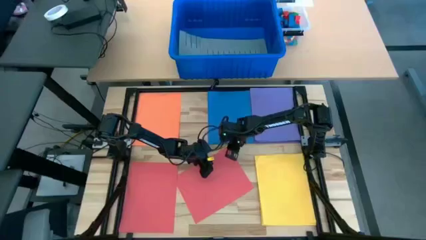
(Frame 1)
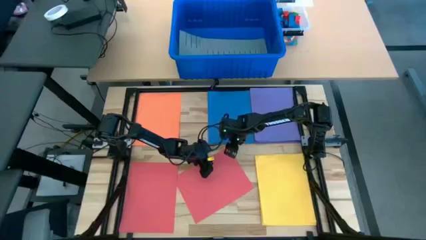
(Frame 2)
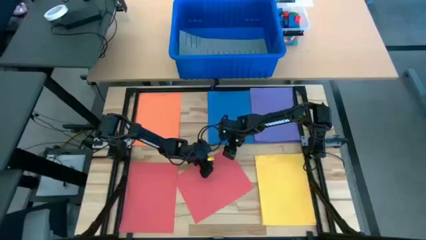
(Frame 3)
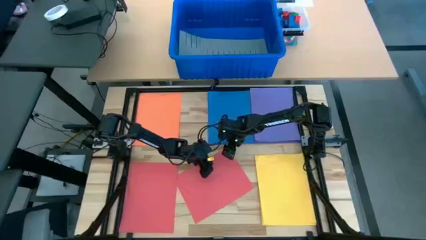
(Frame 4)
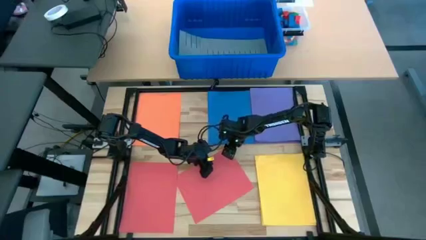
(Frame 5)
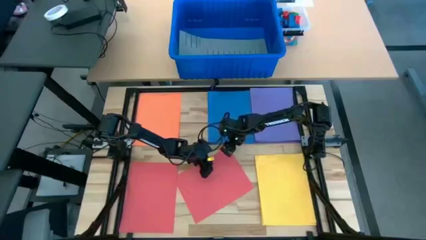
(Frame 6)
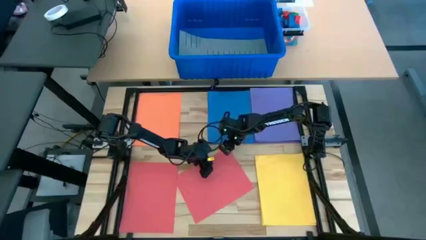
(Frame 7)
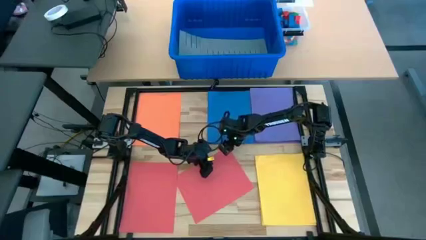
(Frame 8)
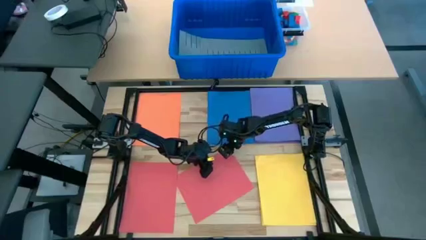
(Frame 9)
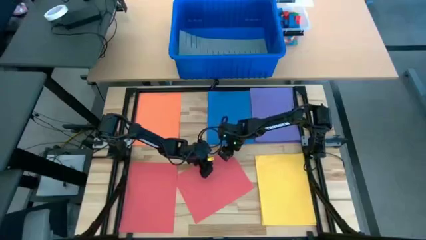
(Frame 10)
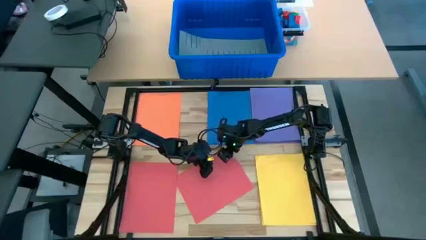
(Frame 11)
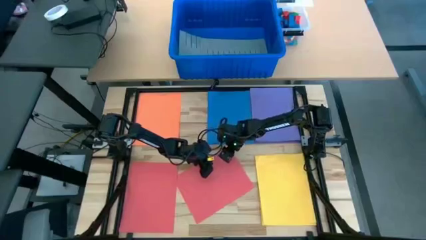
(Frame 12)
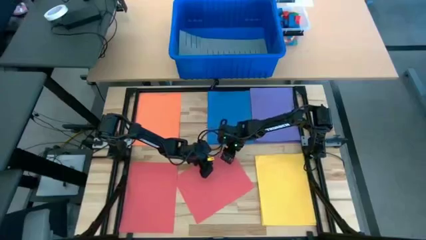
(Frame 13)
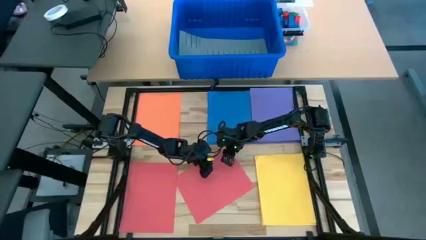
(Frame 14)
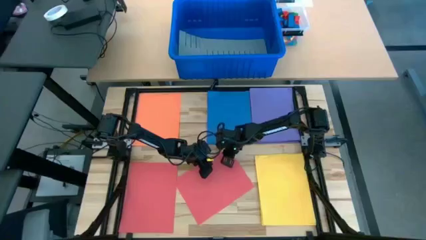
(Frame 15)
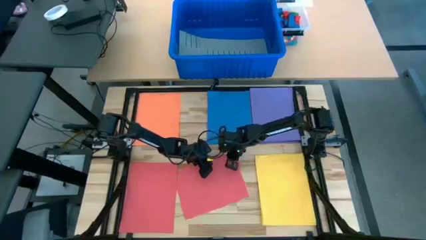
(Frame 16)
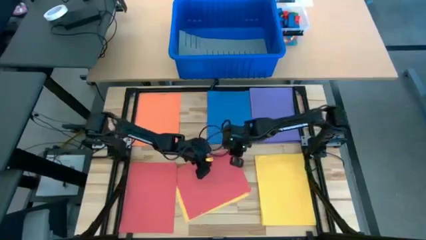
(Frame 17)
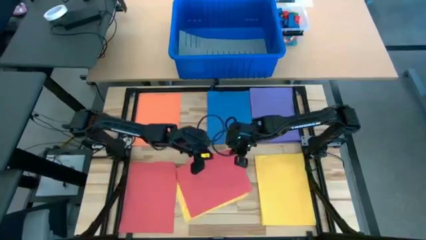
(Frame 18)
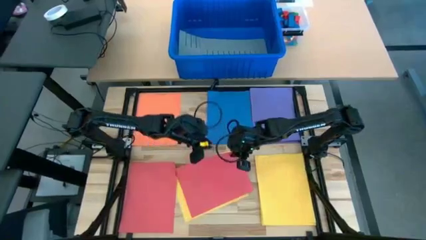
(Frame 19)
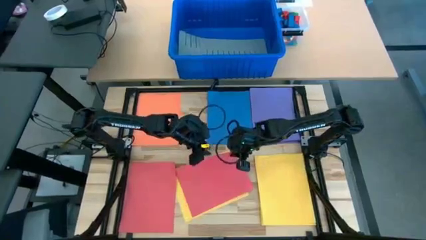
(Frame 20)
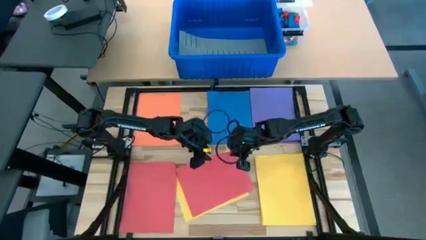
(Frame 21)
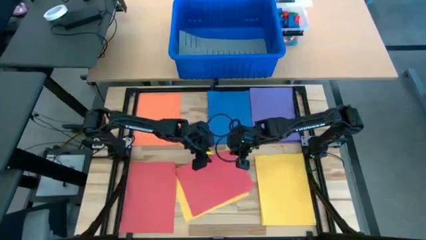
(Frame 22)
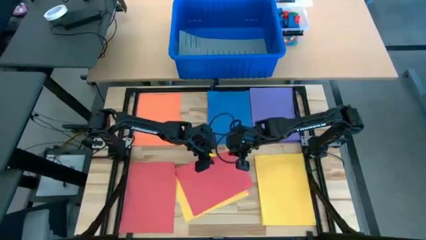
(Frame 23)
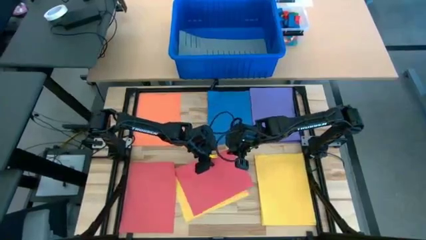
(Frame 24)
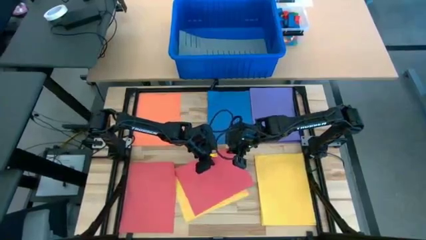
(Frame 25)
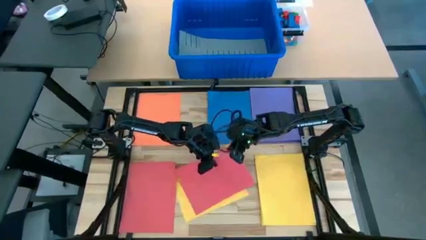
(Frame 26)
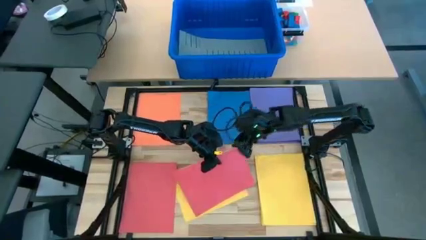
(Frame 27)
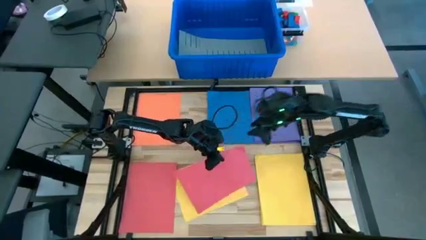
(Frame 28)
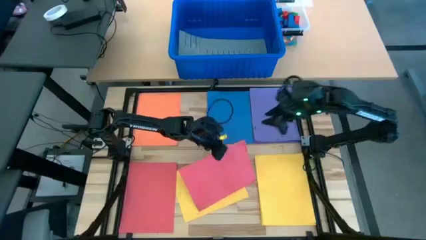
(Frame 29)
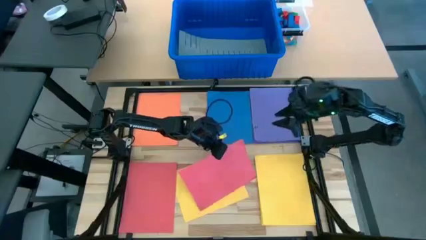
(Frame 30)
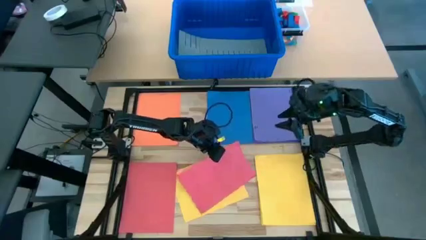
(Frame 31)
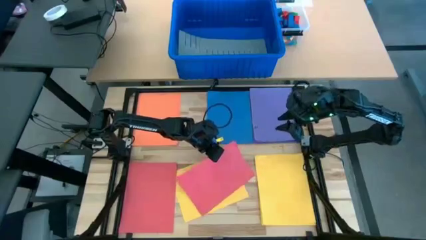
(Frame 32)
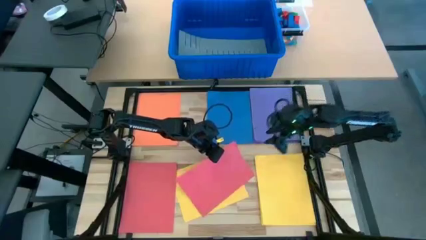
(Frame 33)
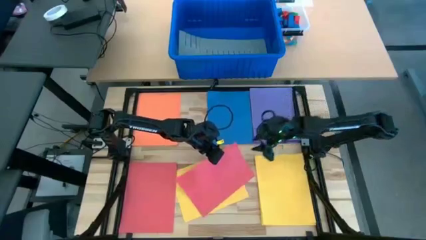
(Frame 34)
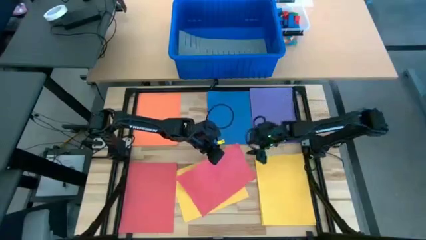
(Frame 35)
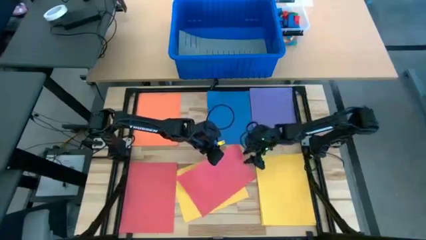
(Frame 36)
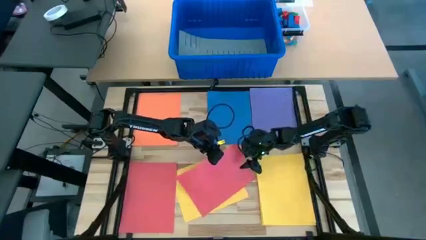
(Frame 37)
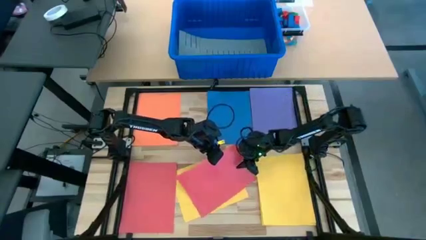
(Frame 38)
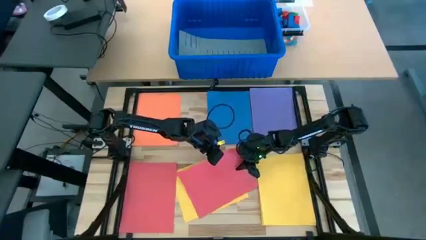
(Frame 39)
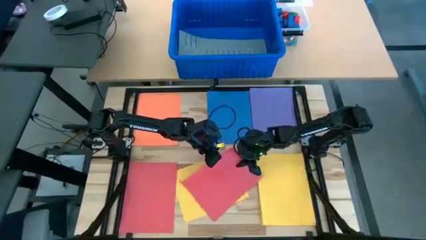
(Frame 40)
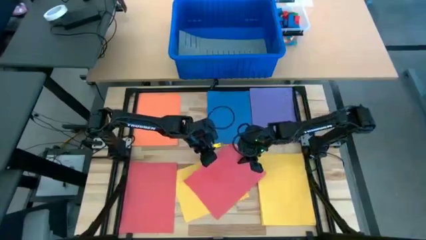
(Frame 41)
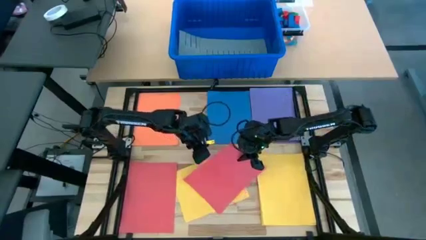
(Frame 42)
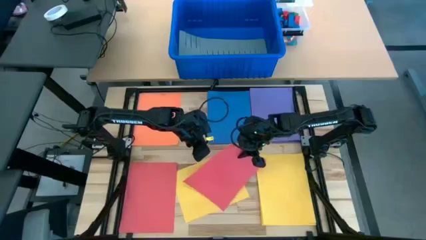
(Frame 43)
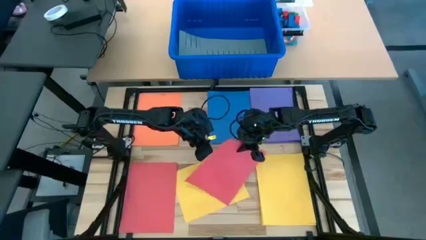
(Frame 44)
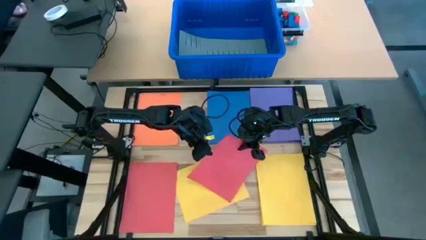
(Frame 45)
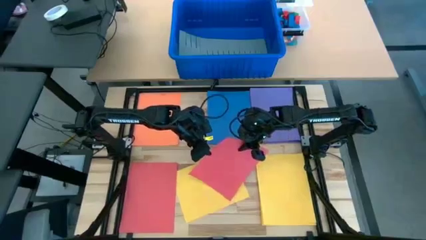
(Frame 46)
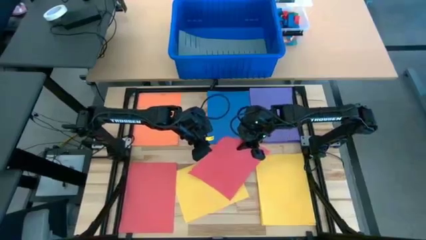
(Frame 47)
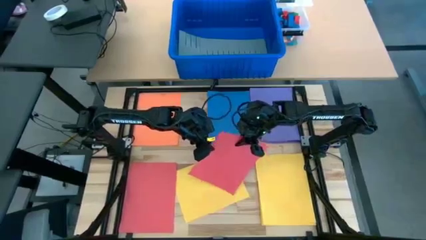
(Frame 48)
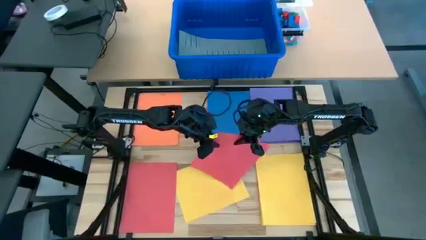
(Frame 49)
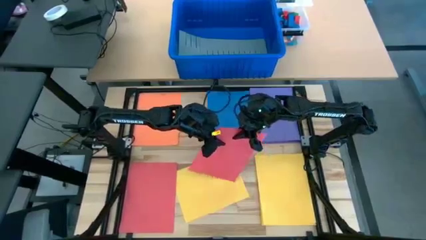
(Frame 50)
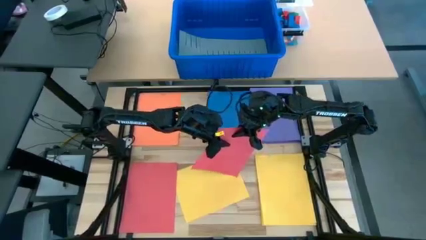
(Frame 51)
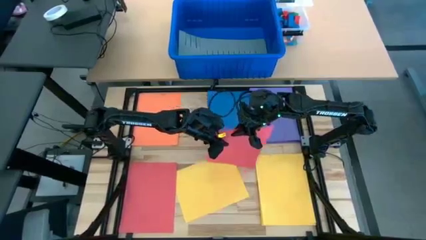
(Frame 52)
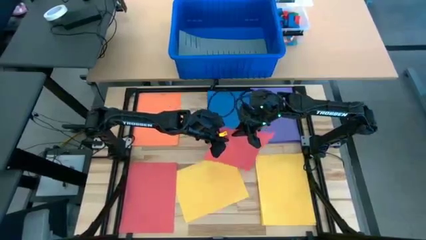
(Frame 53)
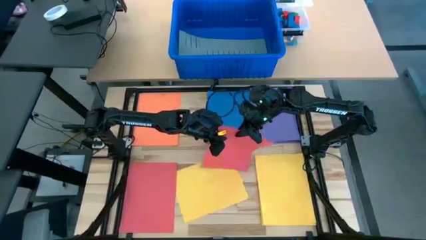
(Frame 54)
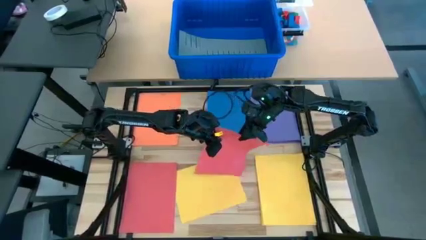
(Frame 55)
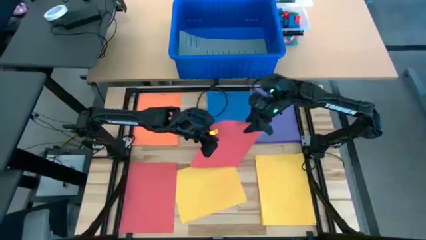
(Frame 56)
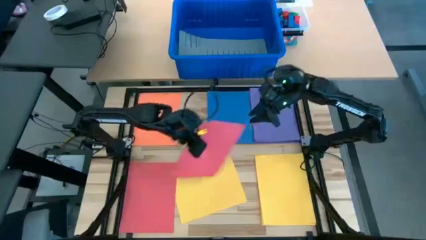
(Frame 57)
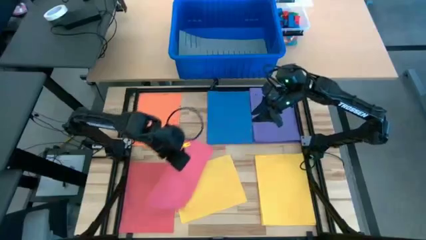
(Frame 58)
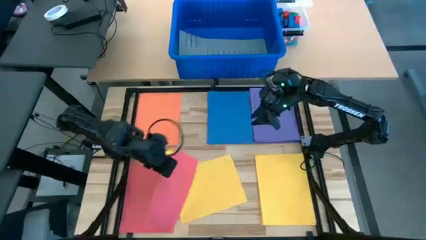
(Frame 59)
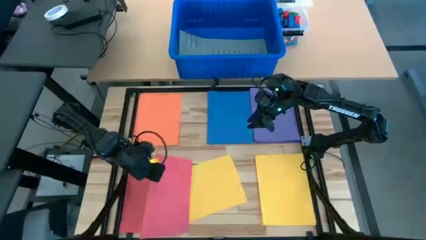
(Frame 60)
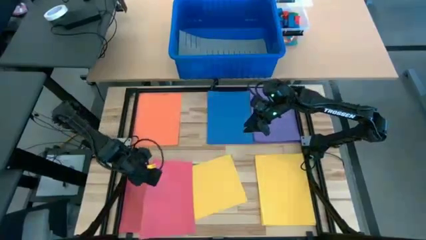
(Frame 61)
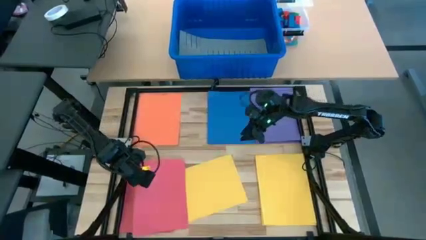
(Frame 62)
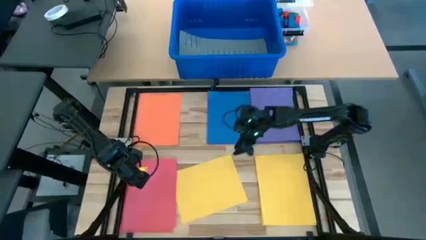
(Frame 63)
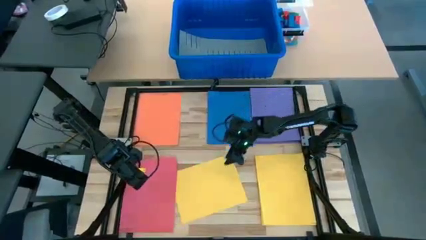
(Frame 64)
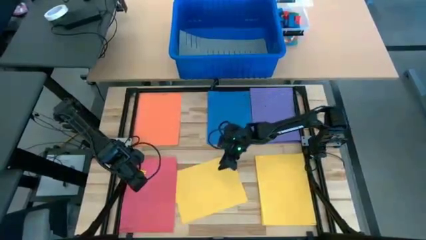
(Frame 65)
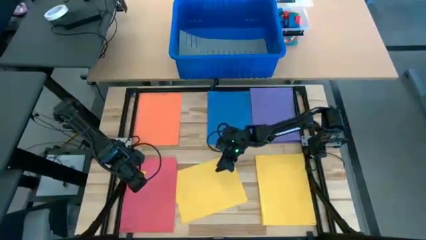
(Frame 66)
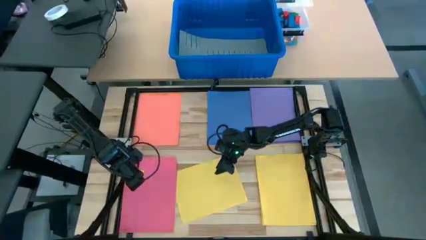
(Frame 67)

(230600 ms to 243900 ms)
Task: Organize paper
Stack the red paper on top of the other red paper
